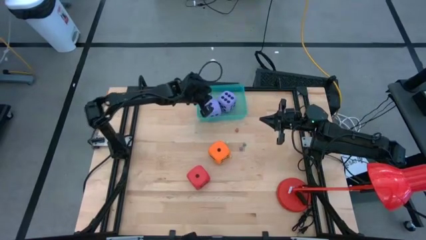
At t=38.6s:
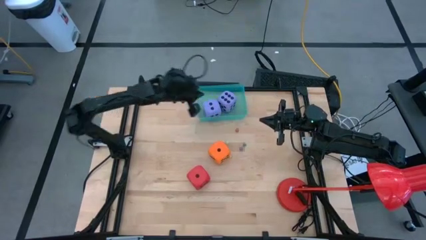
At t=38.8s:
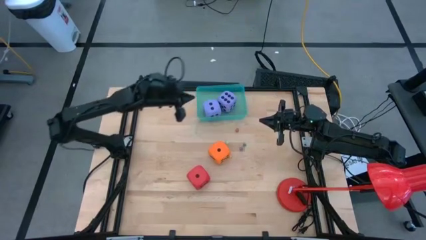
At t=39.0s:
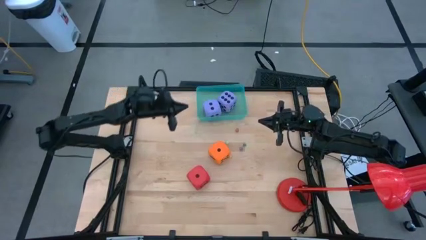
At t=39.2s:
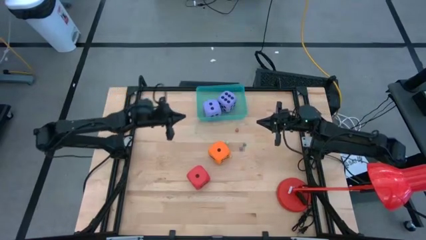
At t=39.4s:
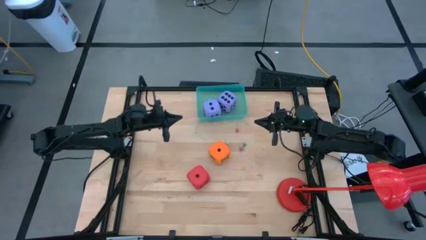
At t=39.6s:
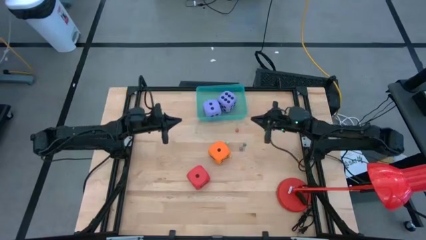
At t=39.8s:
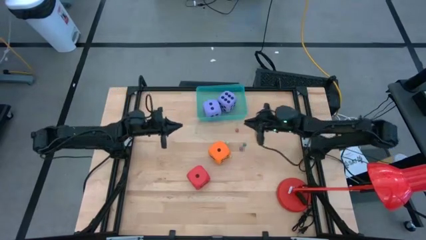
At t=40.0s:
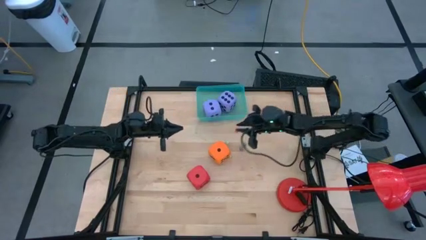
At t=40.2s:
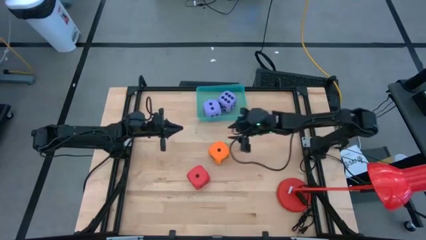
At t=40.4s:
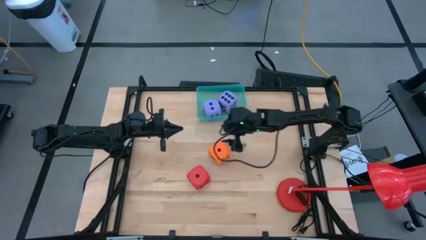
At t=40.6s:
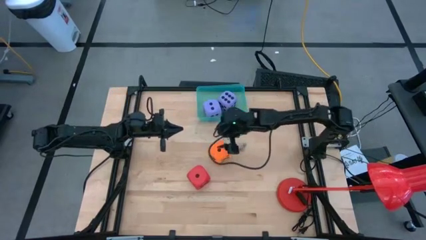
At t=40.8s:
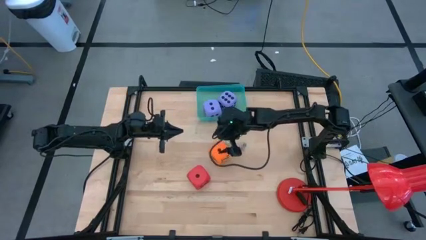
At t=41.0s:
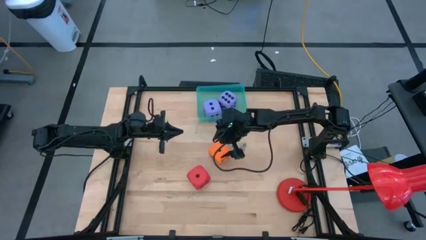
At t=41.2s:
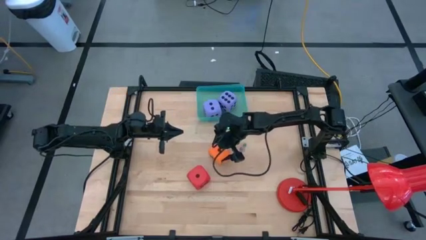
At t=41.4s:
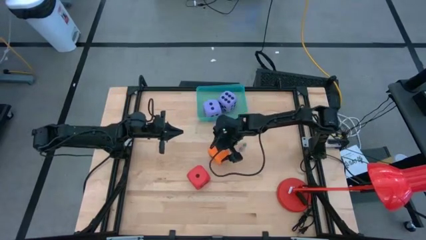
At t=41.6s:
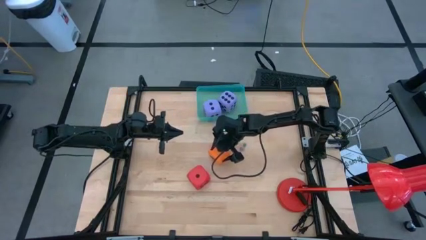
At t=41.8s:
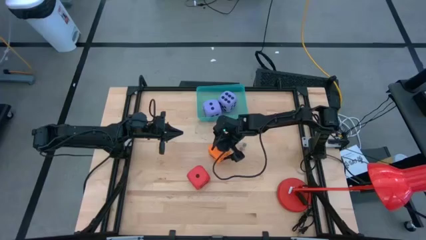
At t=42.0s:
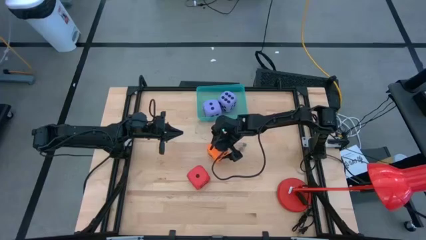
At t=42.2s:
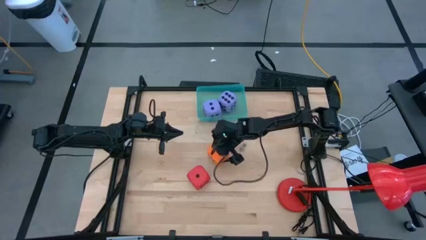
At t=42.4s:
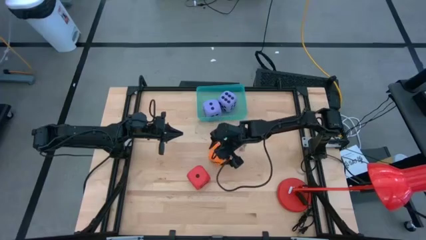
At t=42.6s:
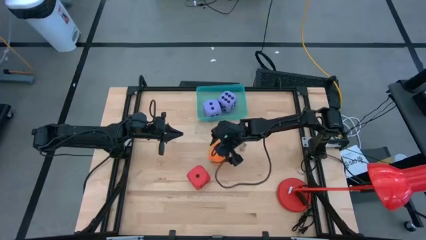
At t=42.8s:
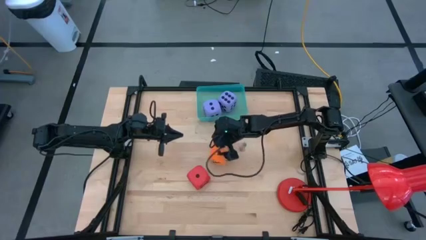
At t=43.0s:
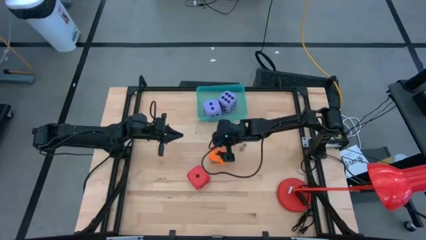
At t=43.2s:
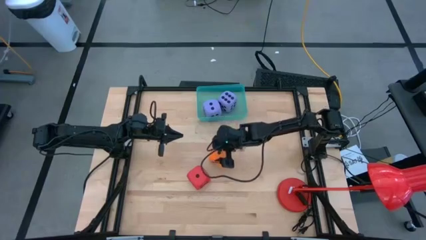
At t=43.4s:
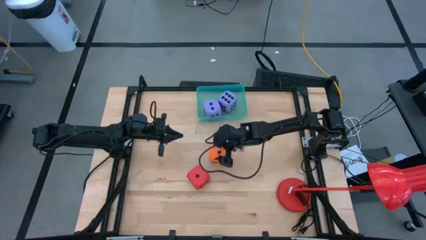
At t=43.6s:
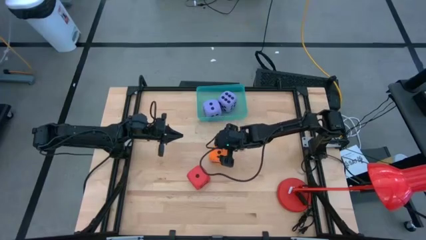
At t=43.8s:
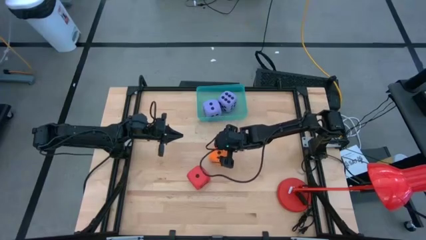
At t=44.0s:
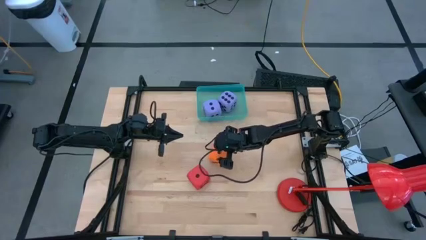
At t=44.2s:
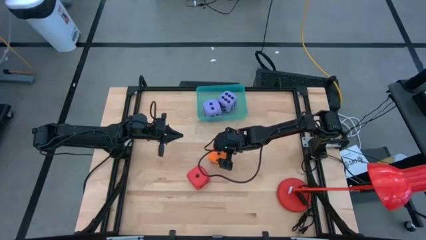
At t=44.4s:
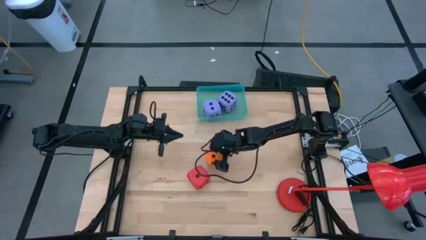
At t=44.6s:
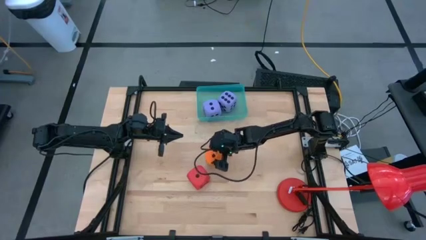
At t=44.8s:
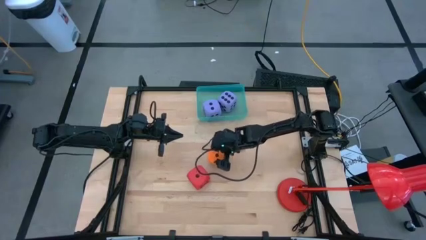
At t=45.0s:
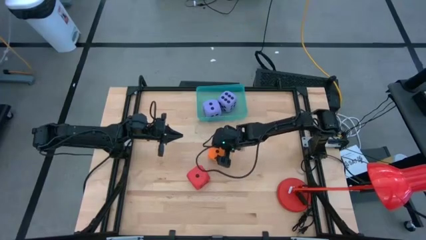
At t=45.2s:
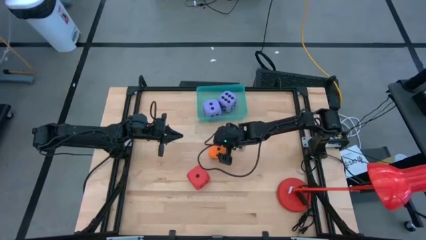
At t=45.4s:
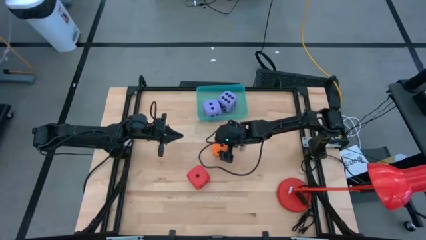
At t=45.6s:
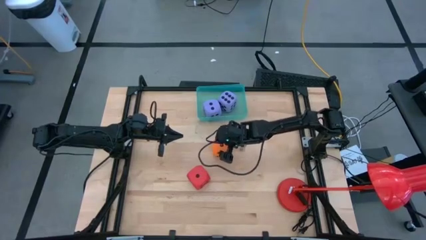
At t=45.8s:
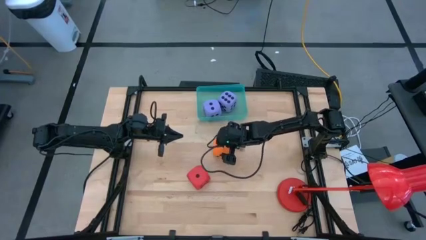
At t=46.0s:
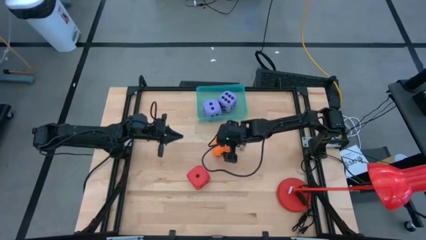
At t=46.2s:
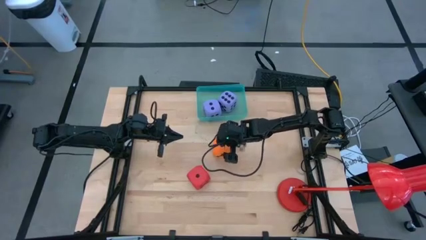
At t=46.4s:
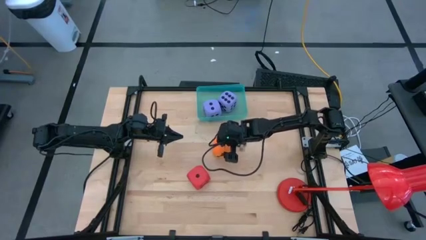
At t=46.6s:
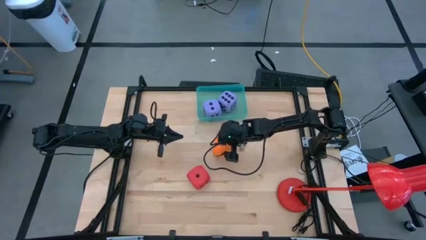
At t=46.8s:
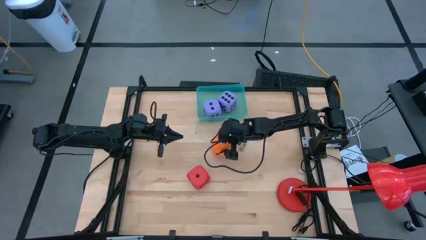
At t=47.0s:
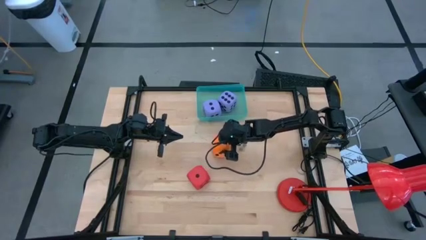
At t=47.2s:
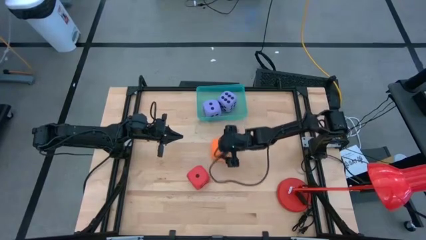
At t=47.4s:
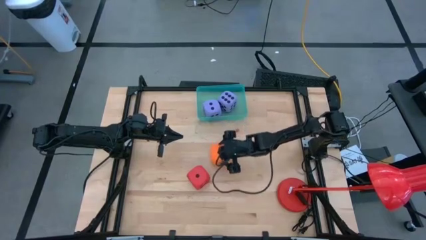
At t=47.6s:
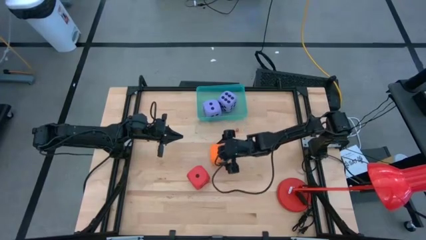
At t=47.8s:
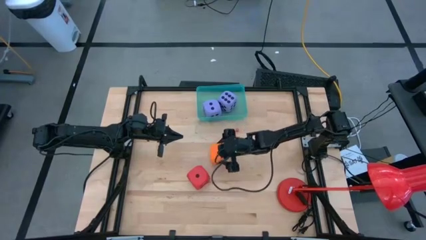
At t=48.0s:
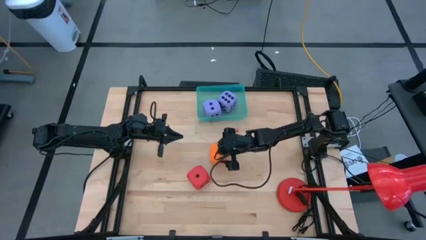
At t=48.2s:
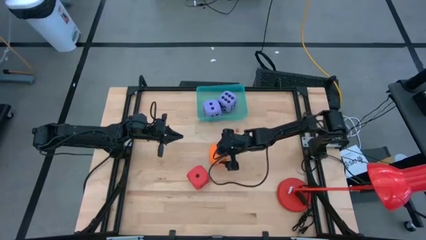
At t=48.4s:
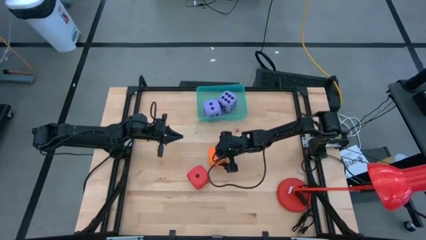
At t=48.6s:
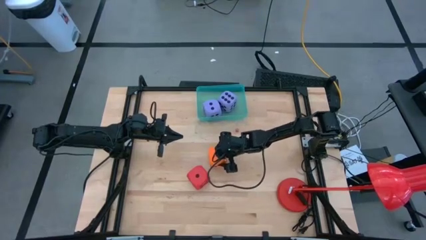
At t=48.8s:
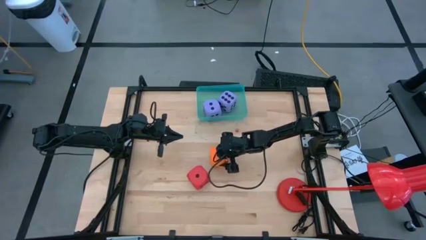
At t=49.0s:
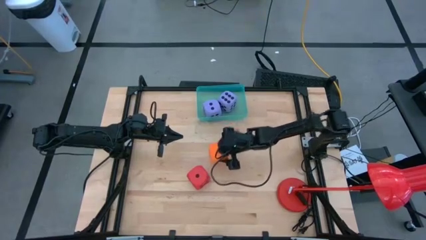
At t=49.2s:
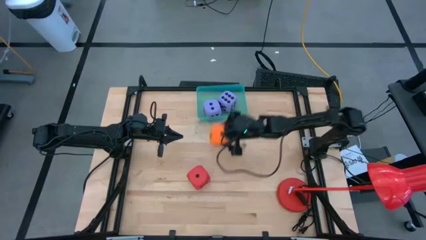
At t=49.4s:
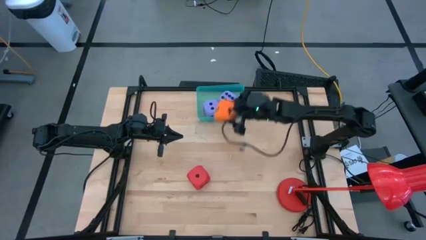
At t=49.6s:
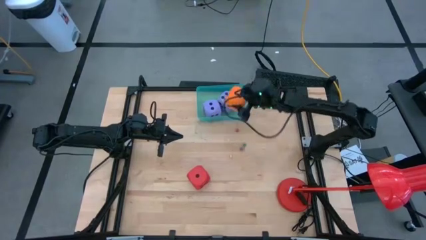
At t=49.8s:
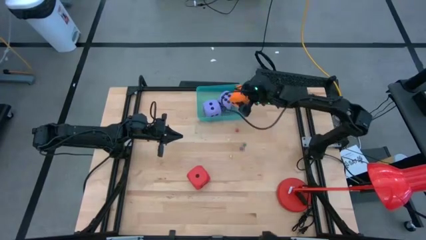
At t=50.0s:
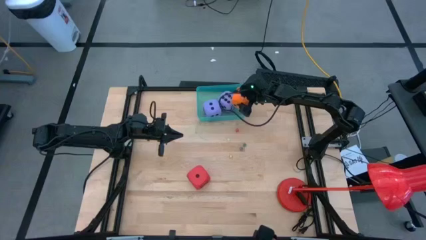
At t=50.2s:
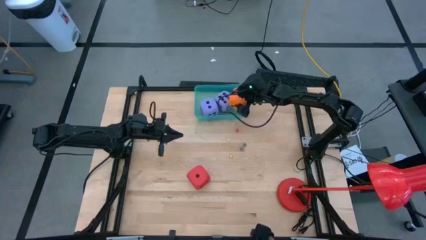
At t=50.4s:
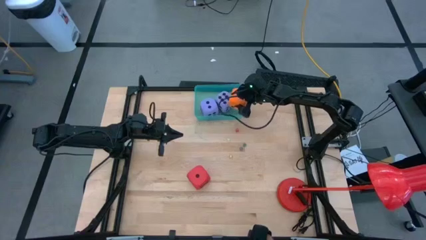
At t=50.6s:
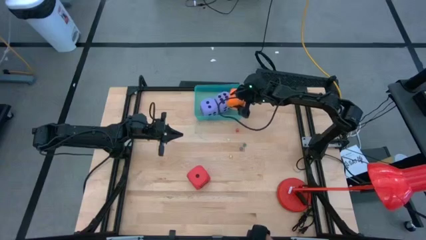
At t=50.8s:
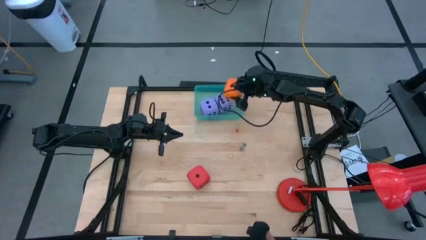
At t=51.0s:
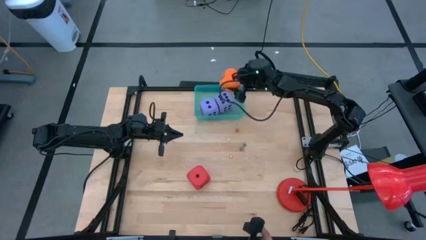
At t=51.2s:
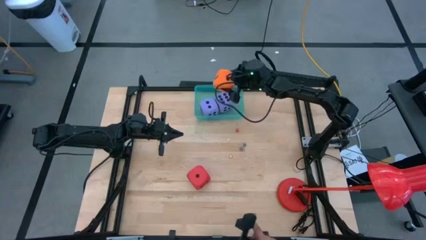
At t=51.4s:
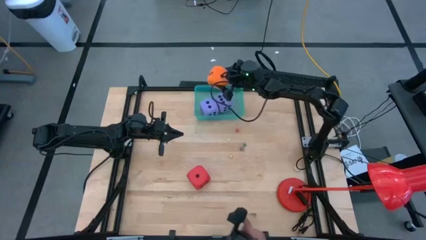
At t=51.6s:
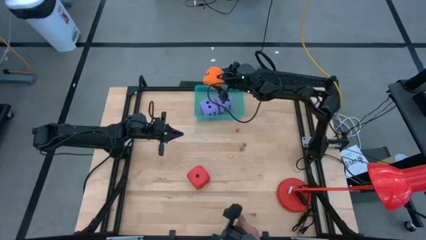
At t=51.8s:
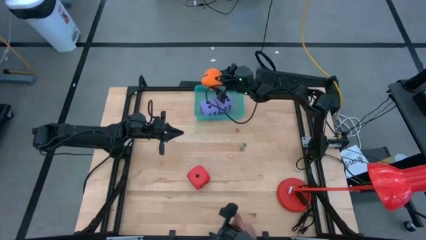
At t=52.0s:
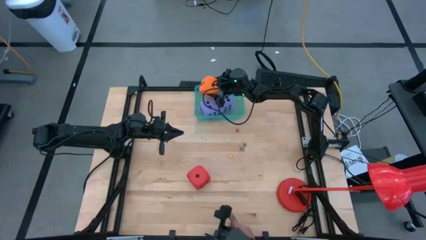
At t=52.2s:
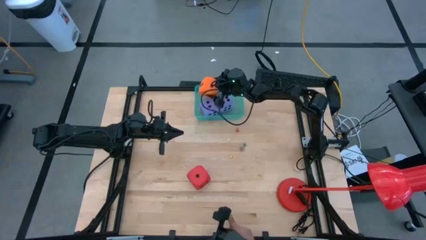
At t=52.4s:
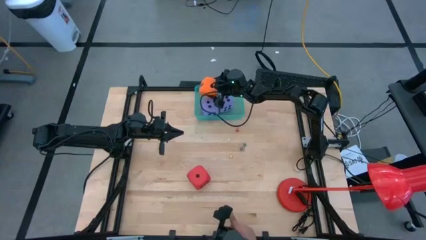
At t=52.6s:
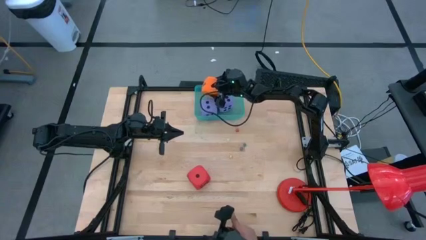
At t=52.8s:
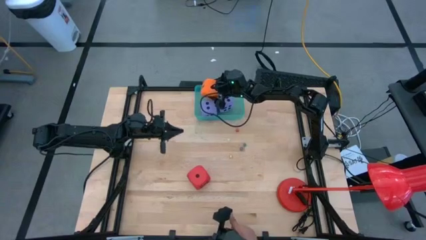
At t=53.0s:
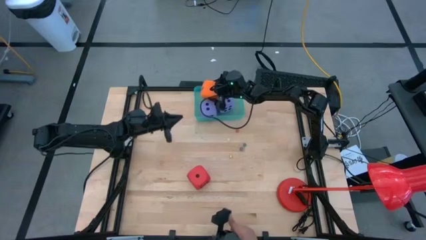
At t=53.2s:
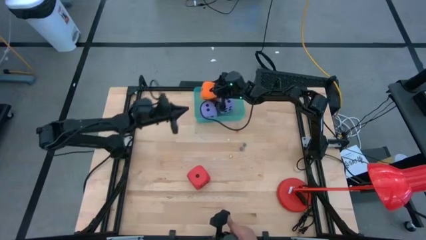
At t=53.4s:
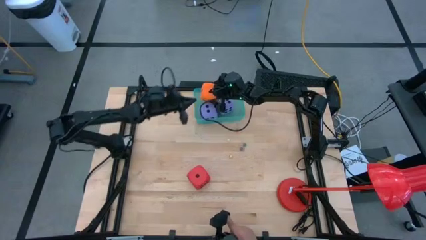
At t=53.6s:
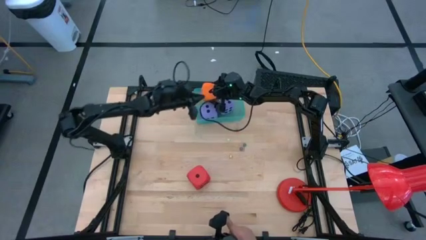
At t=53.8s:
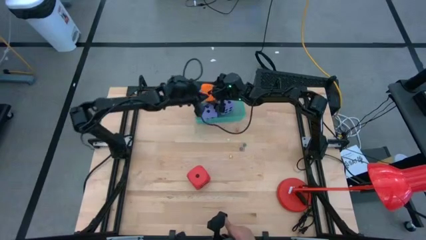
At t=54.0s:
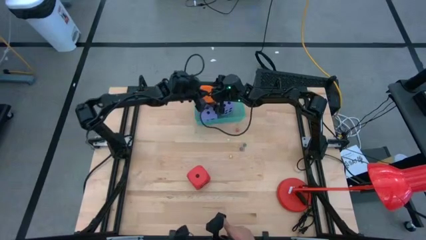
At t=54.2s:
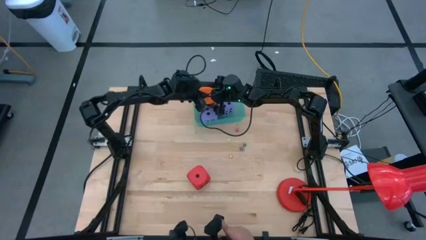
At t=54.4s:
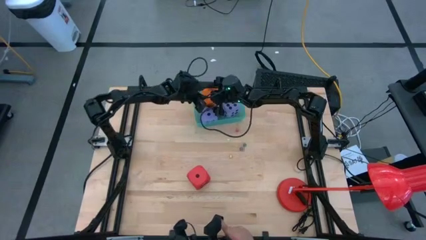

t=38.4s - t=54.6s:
Task: Pick & Place Dice
Put the big orange dice into the green bin
